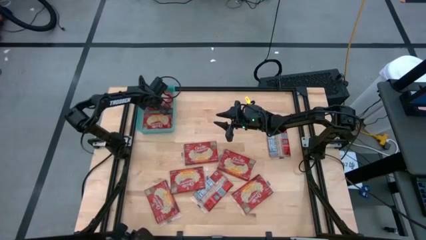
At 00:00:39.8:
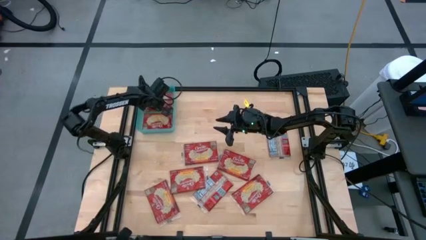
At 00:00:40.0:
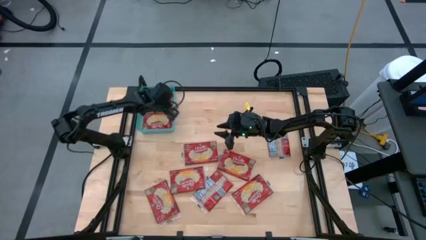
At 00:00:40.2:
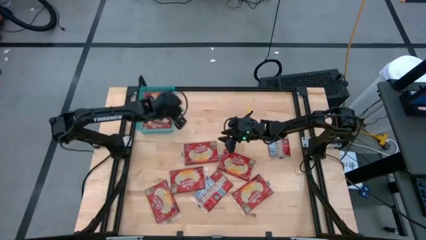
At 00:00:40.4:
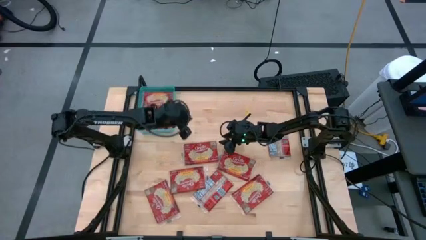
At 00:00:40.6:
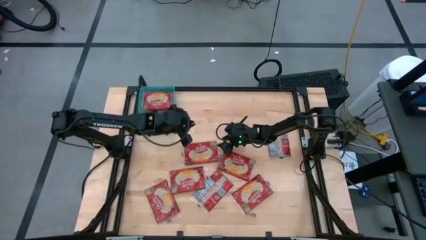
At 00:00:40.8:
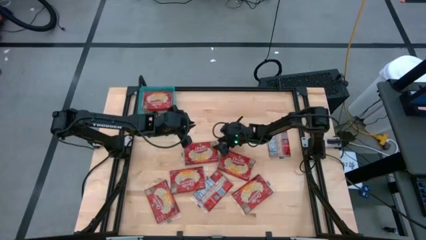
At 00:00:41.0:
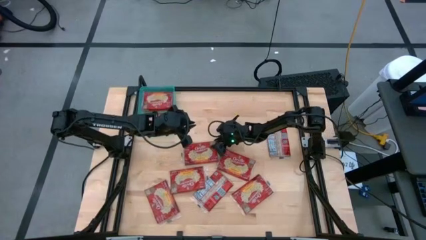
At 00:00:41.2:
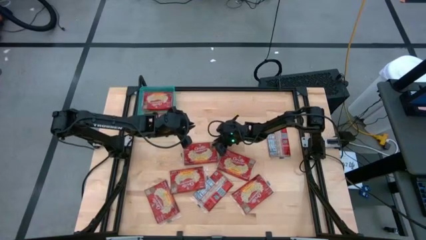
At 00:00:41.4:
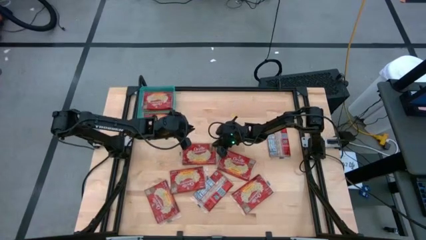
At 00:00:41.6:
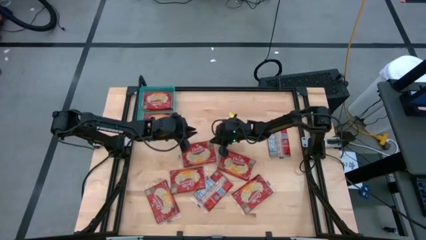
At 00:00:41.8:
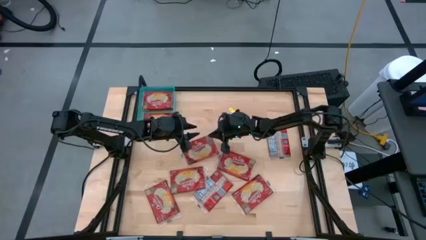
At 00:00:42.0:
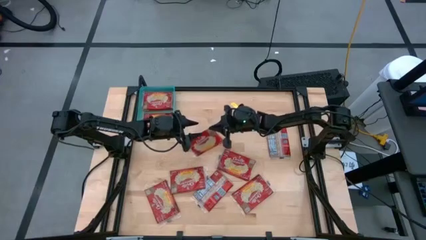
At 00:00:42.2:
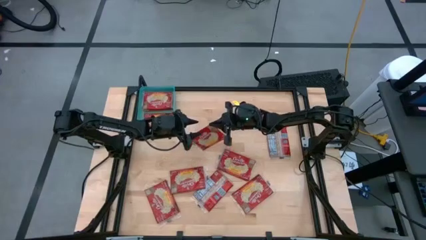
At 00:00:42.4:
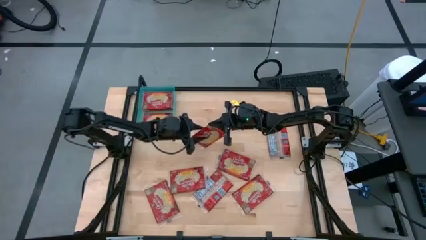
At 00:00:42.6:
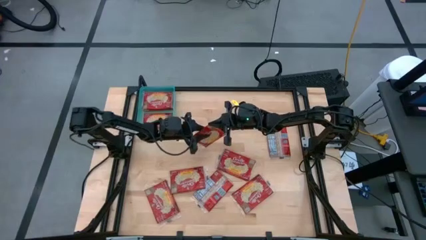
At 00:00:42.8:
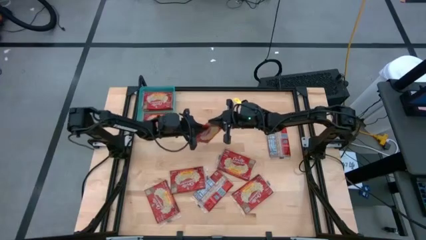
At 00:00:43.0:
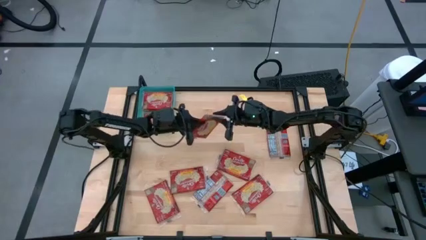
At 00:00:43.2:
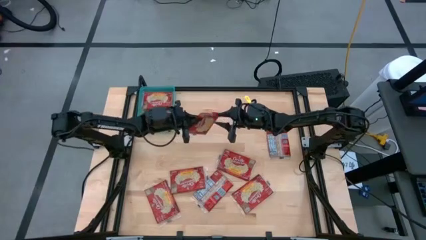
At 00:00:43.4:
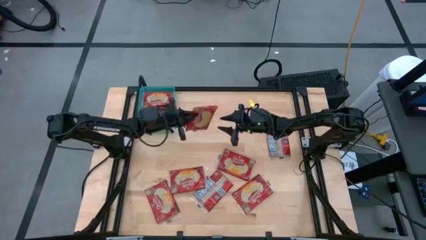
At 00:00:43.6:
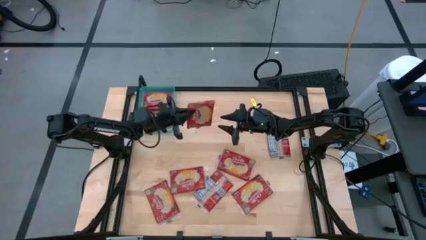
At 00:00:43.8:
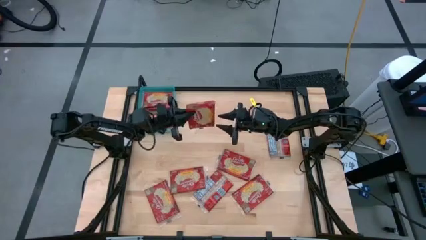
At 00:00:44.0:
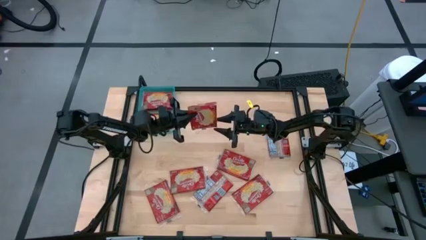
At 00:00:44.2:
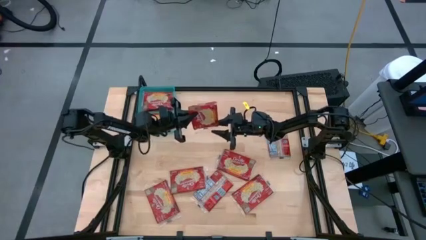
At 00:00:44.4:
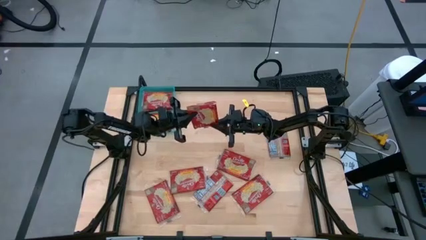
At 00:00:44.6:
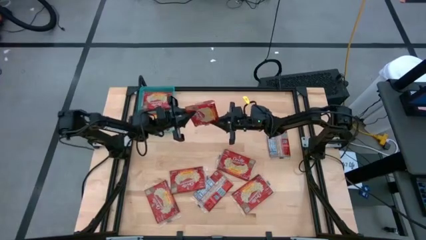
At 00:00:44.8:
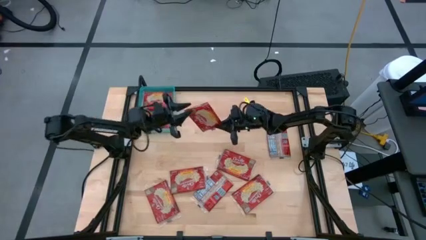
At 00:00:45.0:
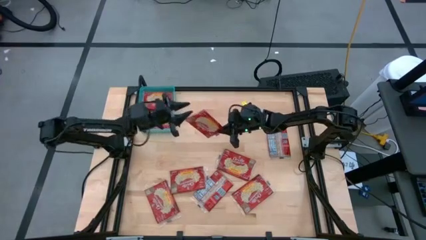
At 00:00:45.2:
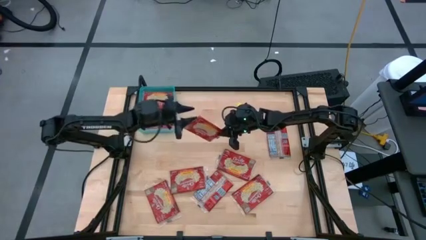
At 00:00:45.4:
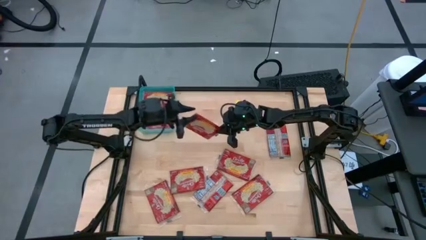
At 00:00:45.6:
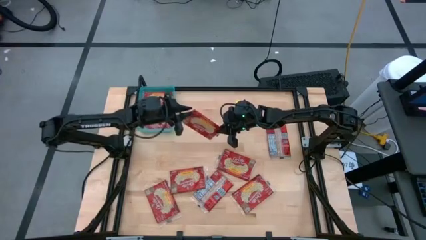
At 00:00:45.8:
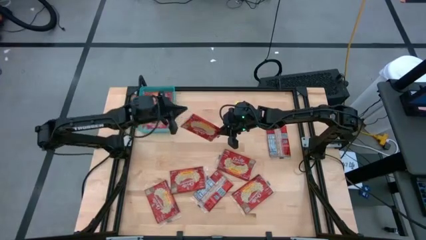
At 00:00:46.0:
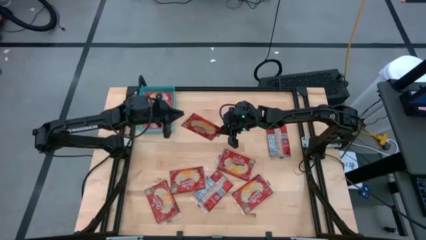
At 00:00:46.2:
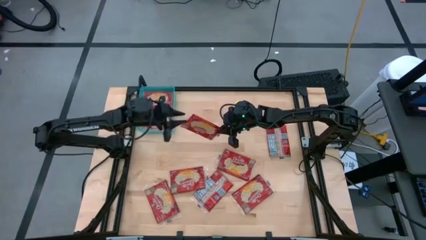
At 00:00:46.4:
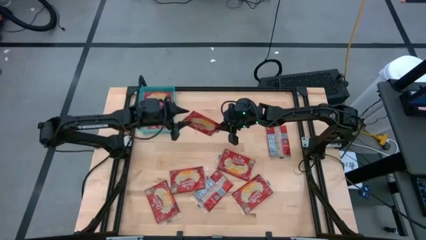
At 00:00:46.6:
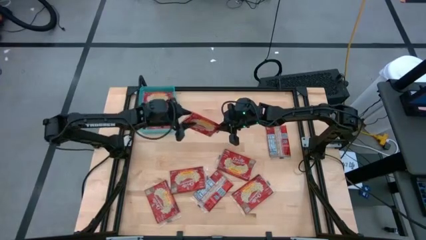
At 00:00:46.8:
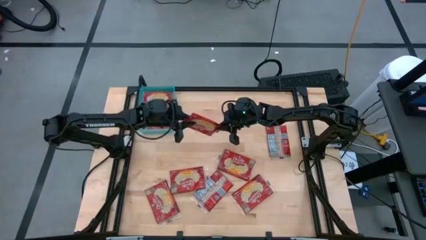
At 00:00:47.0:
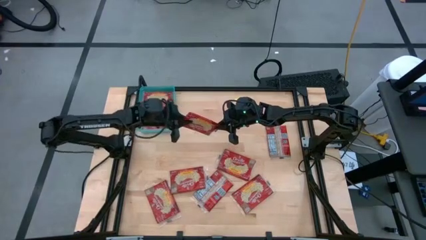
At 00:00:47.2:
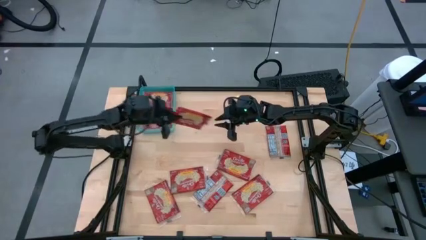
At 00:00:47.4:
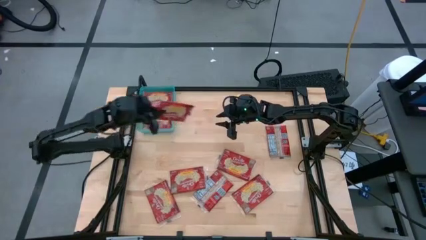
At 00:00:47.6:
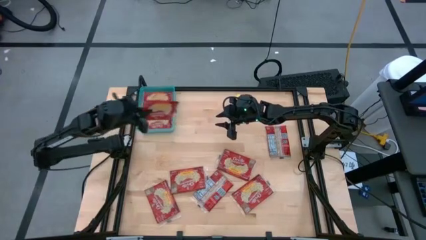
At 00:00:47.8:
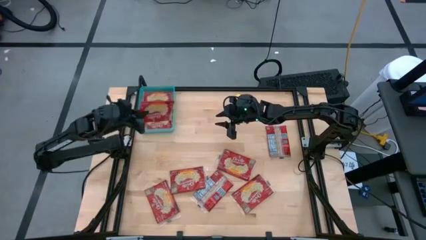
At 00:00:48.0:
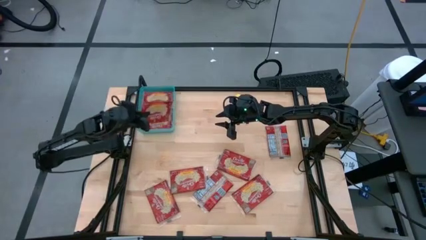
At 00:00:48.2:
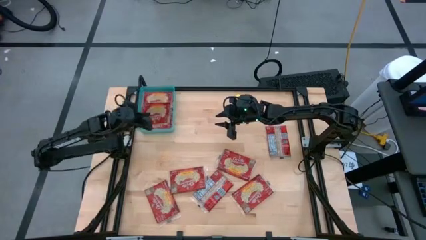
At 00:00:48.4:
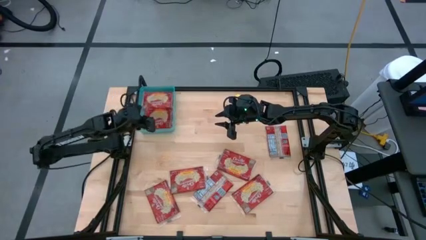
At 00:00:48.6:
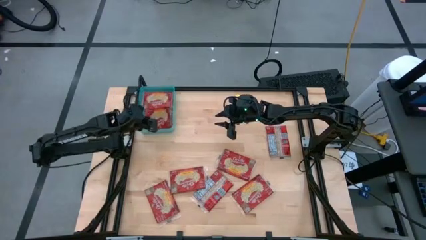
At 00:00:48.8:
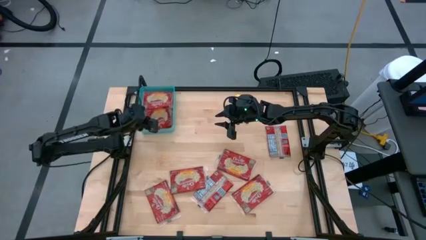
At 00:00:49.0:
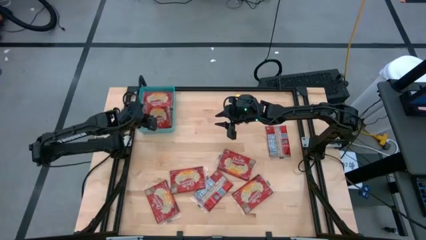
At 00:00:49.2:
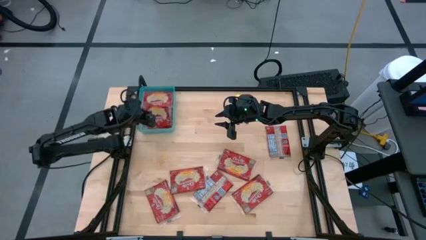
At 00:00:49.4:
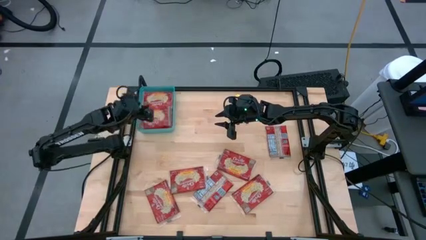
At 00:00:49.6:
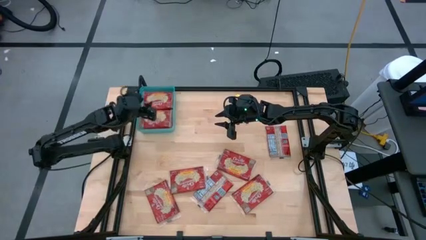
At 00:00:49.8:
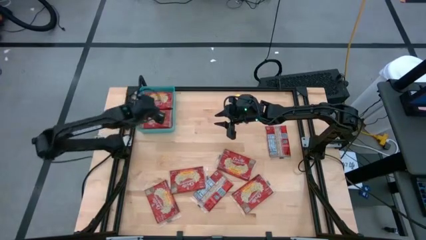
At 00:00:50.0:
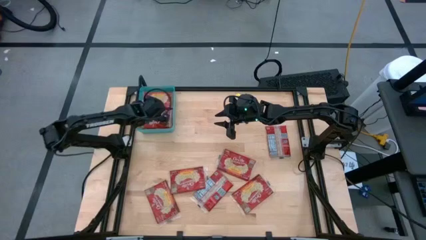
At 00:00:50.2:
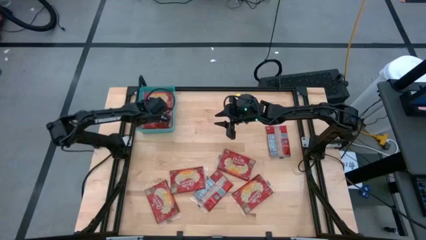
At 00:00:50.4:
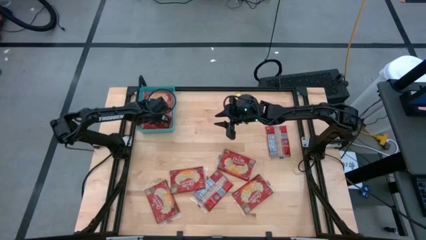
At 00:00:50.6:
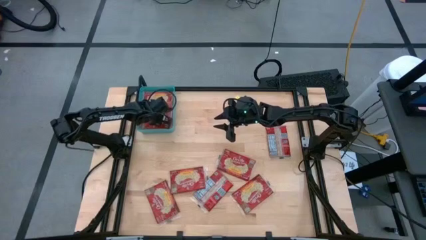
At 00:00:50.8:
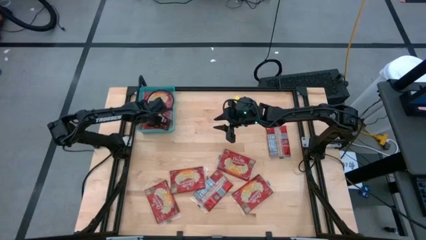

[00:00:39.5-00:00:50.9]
Task: Sort popcorn bags into baskets
Put the popcorn bag into the blue bin
